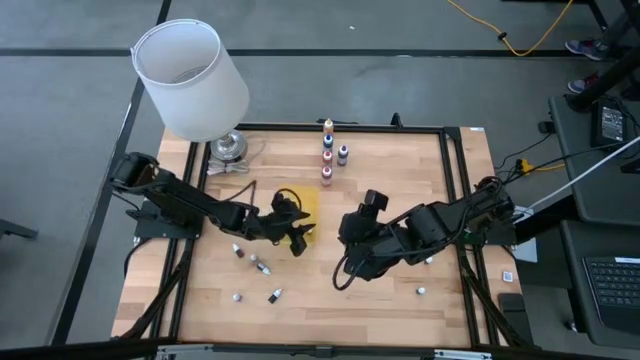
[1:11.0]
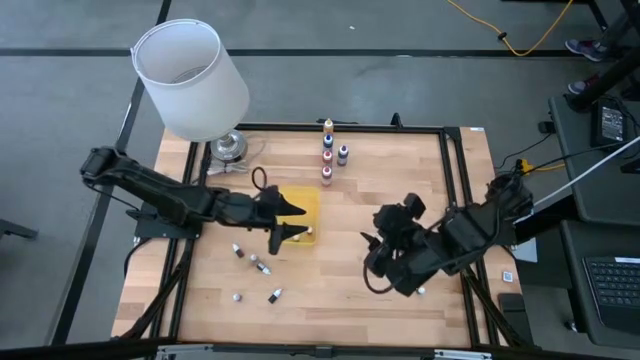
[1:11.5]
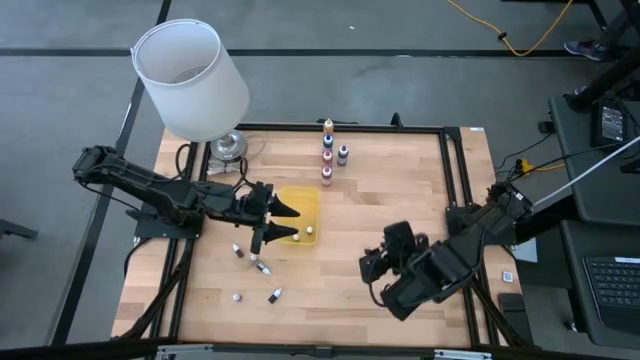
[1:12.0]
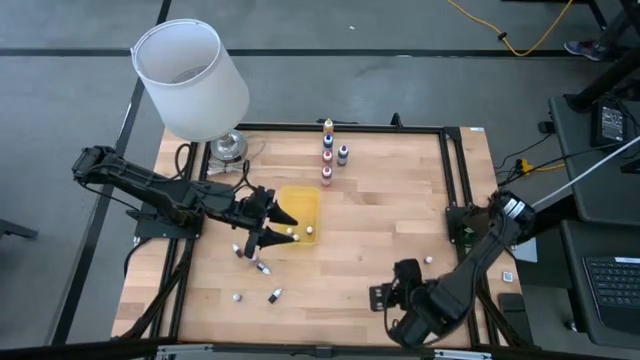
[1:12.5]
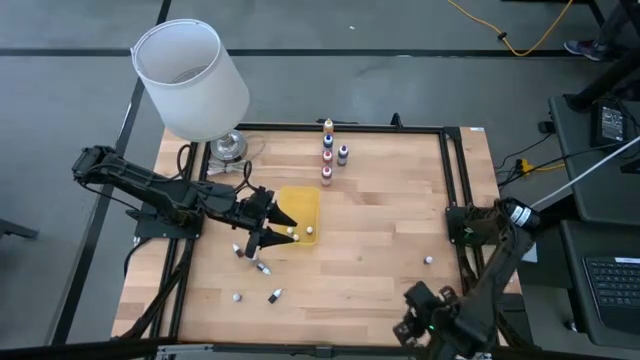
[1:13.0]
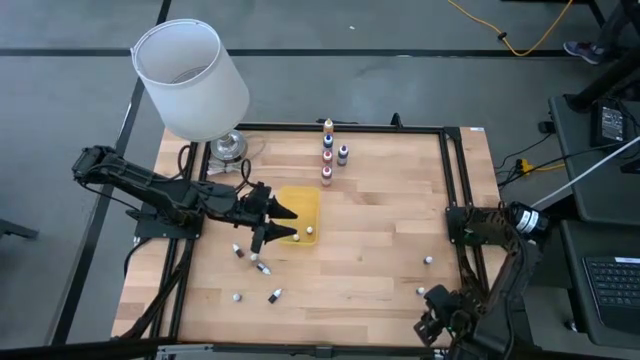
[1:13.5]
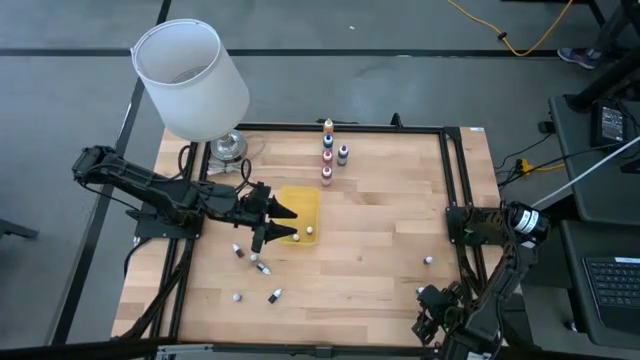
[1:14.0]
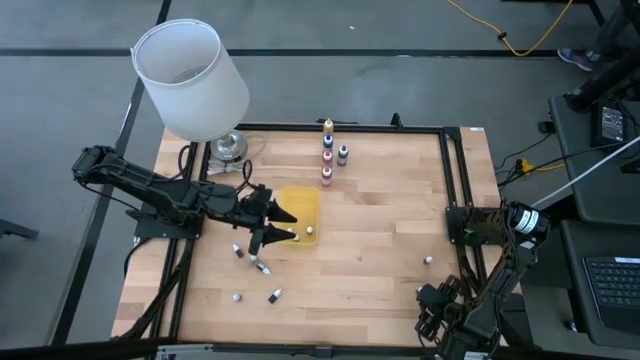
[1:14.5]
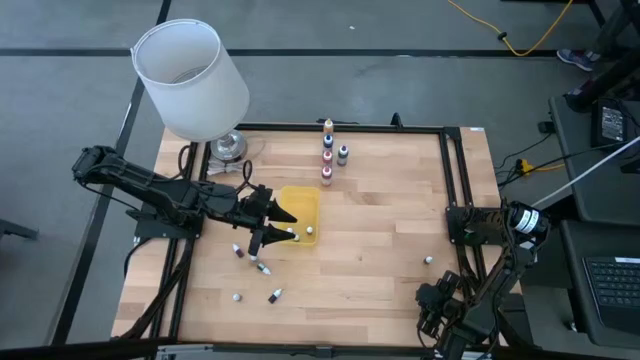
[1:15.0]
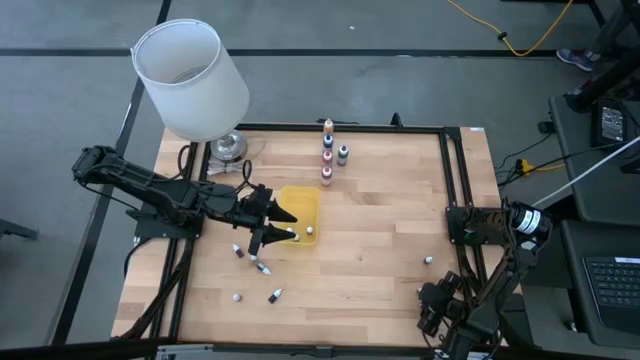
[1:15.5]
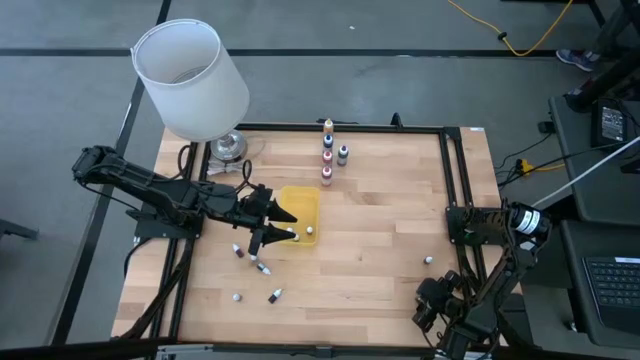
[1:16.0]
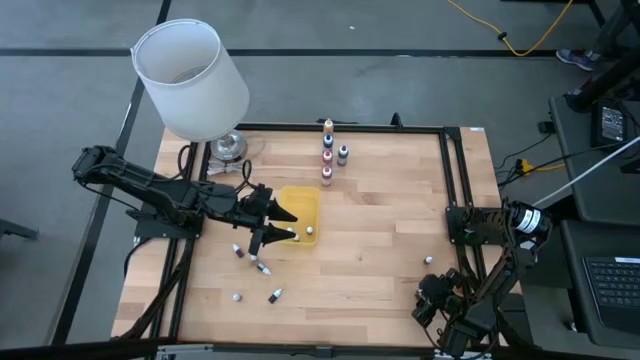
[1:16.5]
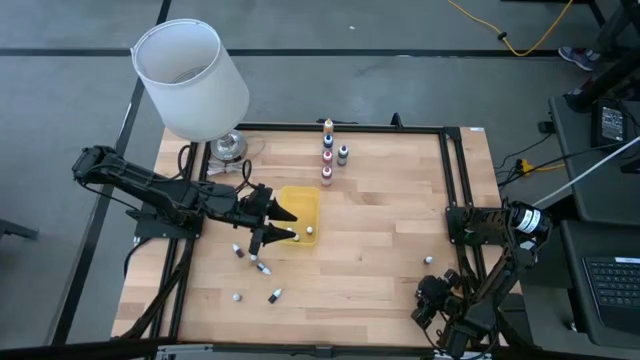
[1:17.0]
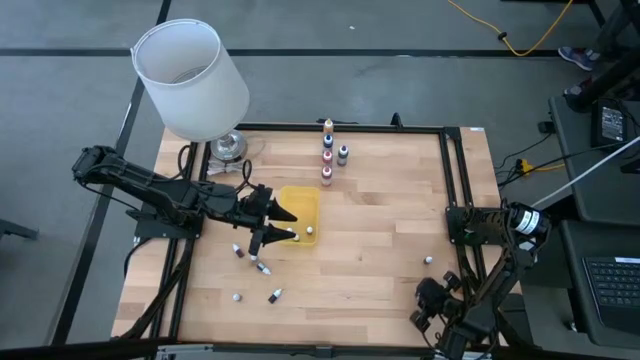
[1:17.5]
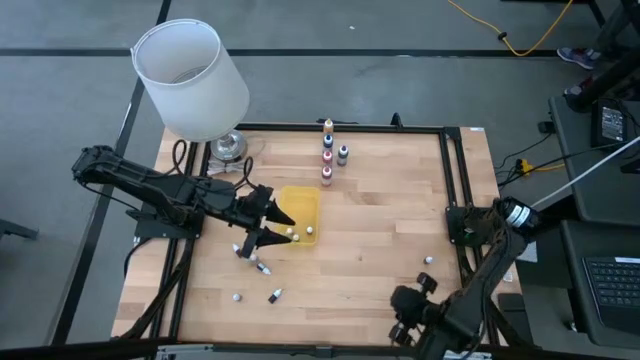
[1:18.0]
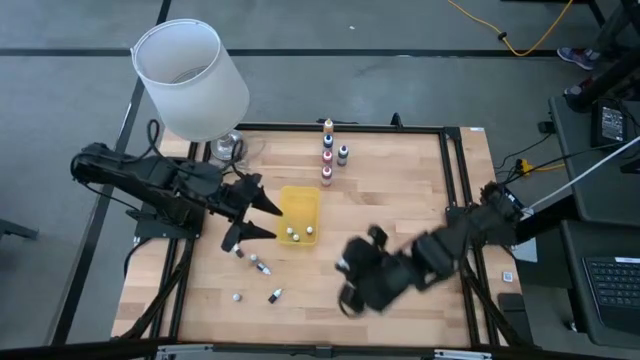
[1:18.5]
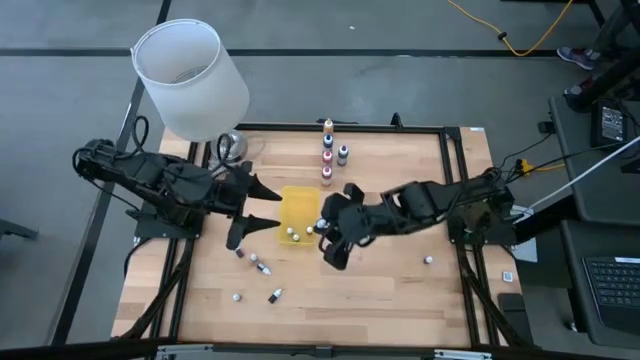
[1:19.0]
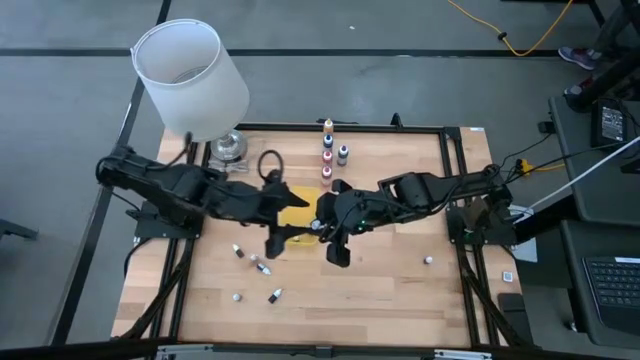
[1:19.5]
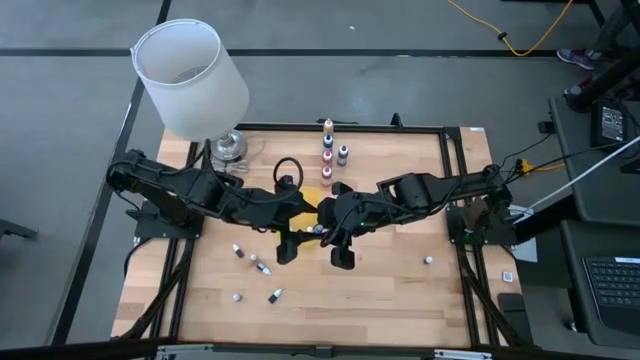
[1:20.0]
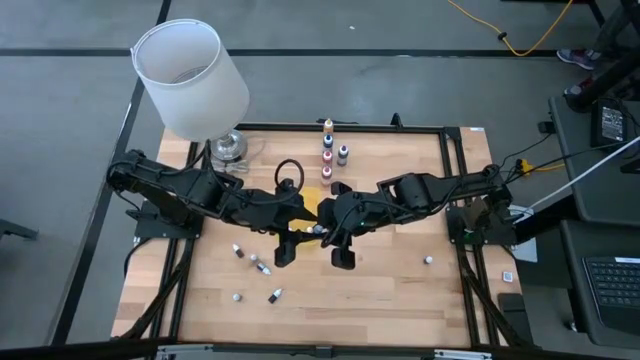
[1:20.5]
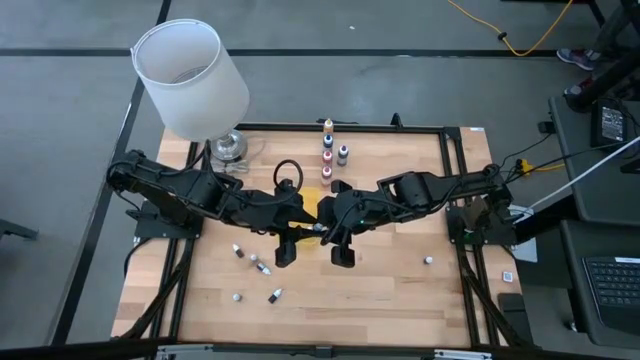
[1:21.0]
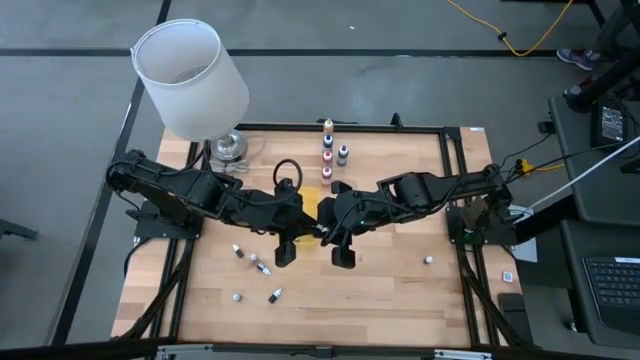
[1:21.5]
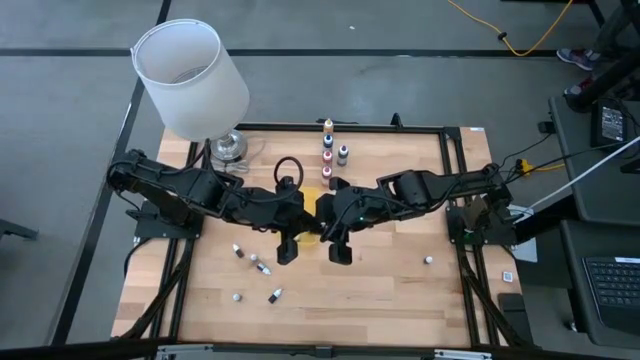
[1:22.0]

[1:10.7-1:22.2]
Task: Pick & Place food coloring
Put the small black bottle into the yellow bin

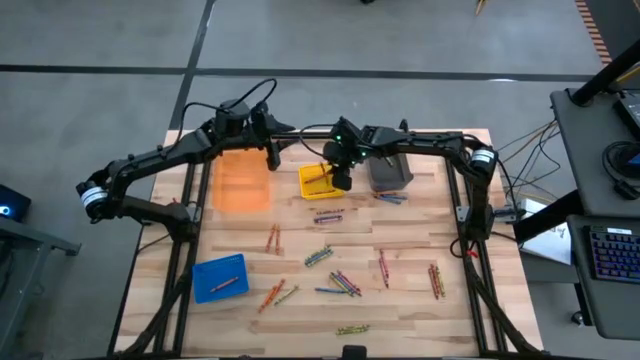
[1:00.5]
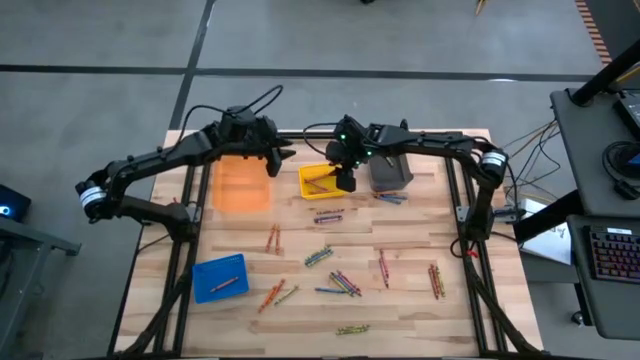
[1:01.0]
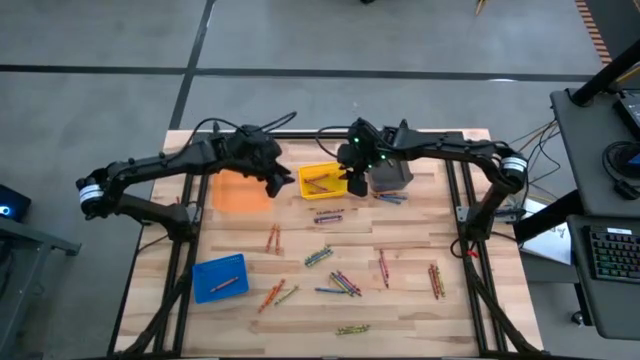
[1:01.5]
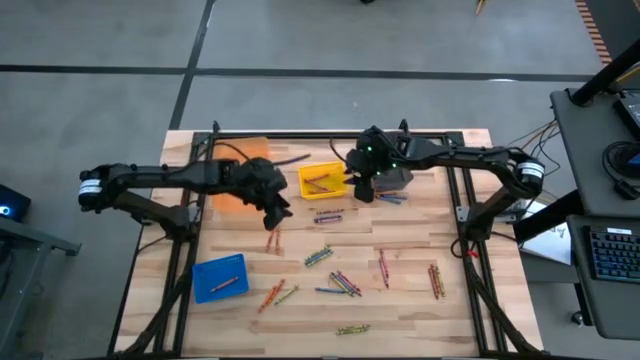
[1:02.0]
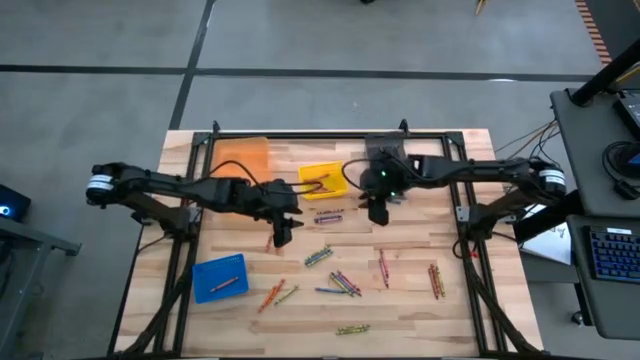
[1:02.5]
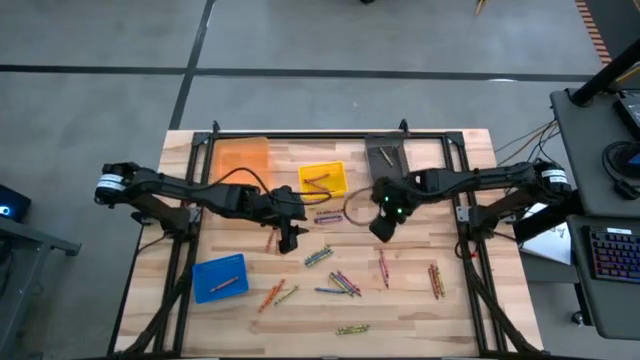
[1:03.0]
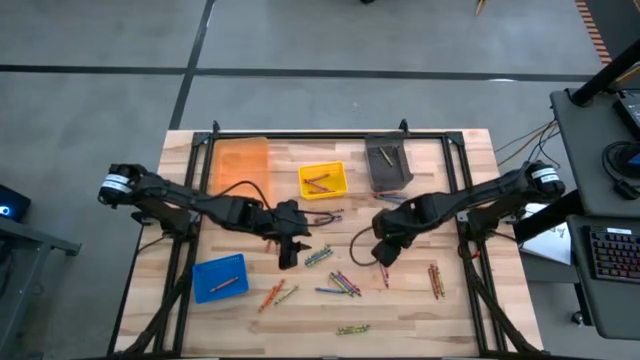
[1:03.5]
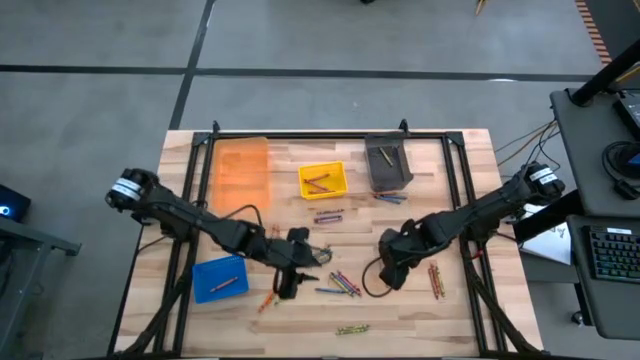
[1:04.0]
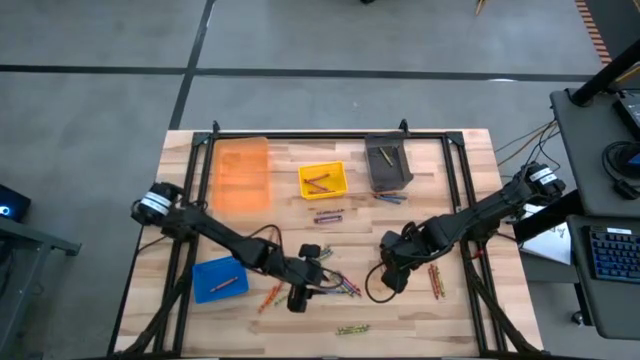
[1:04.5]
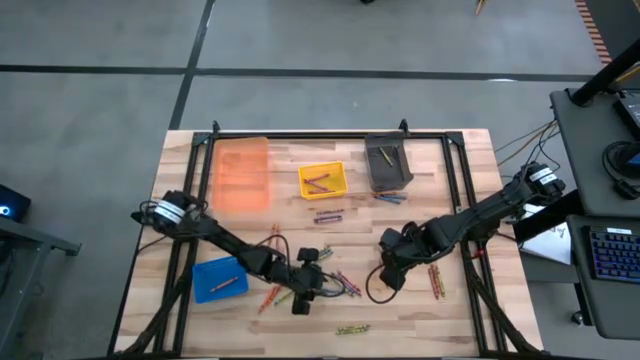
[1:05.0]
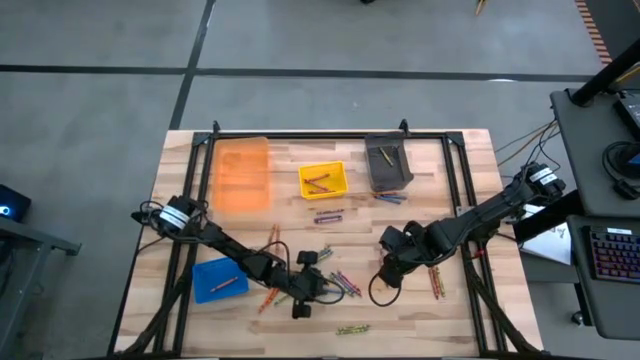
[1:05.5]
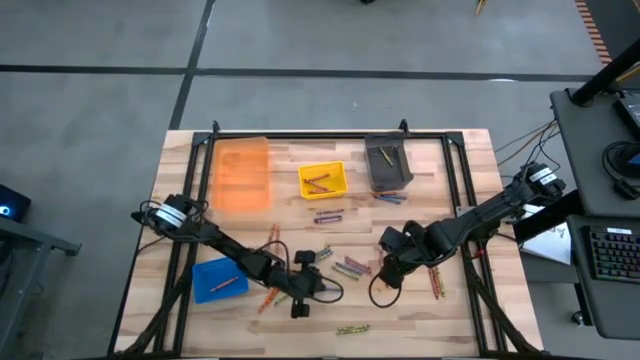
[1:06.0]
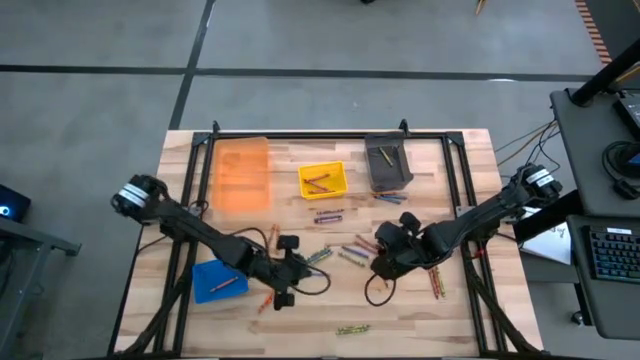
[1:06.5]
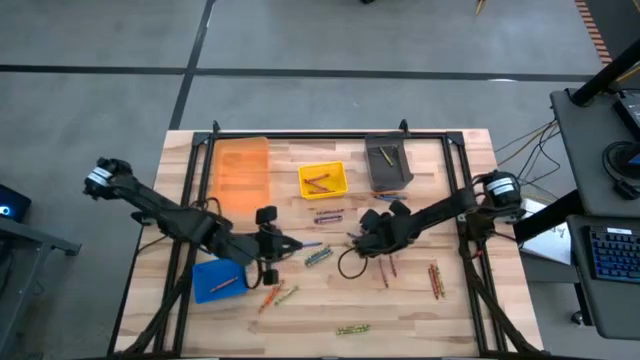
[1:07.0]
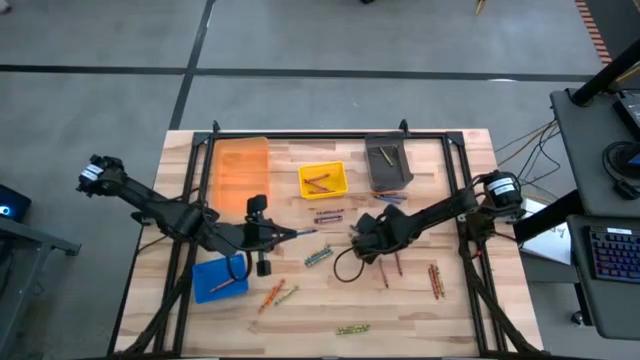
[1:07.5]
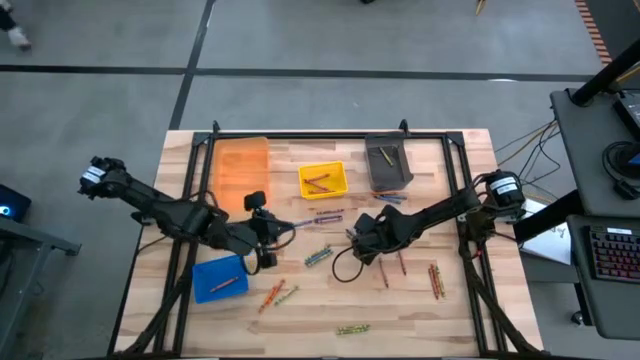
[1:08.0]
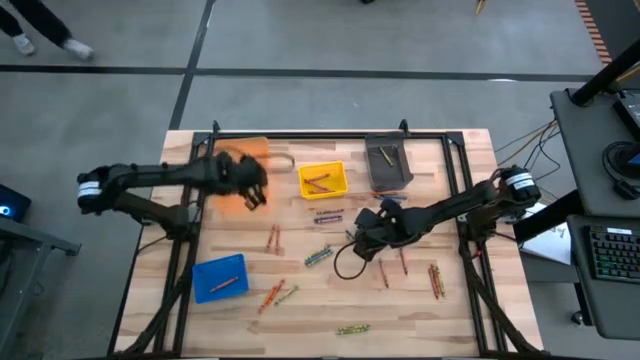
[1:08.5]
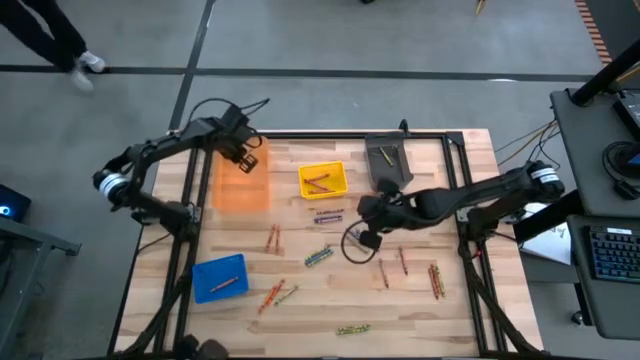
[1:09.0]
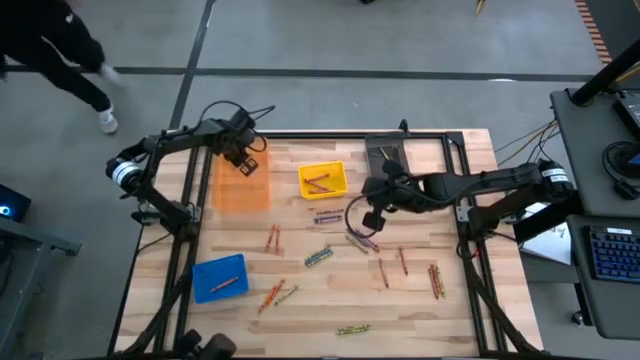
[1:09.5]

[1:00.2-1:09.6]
Task: Sort crayons
Put the blue crayon into the orange bin
